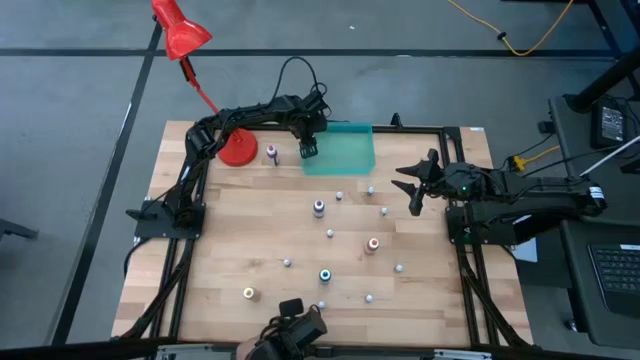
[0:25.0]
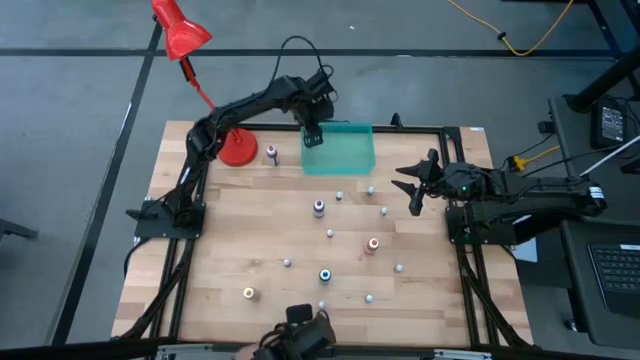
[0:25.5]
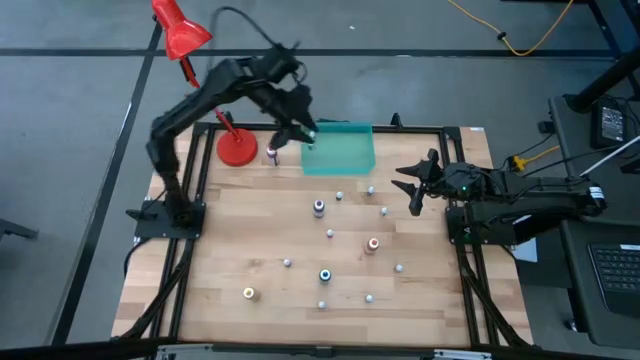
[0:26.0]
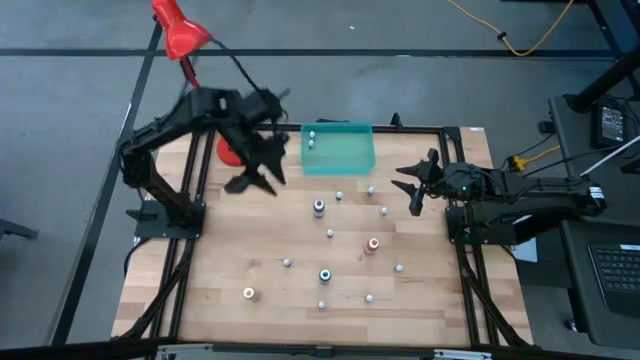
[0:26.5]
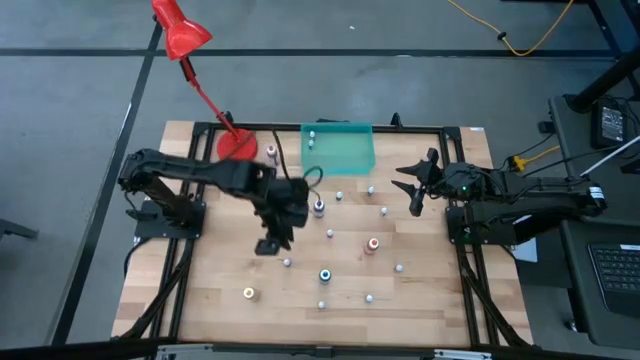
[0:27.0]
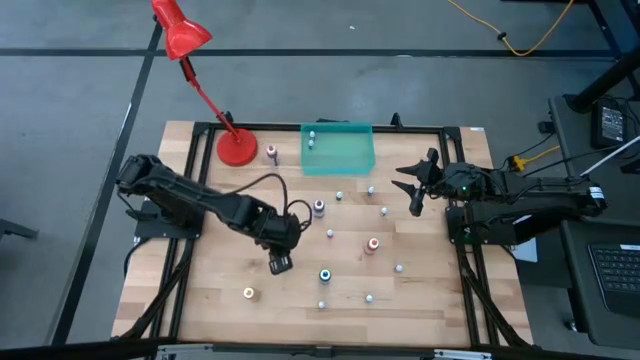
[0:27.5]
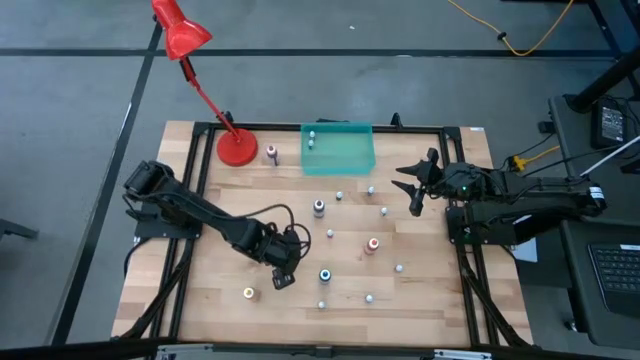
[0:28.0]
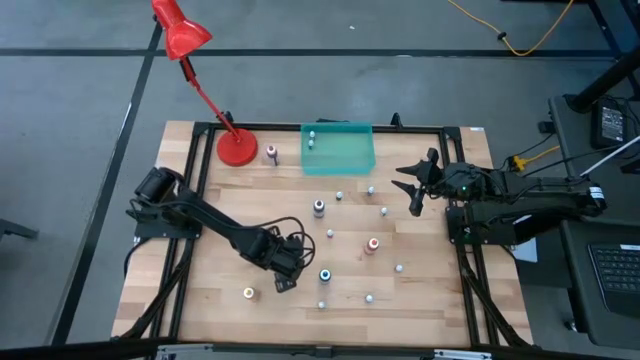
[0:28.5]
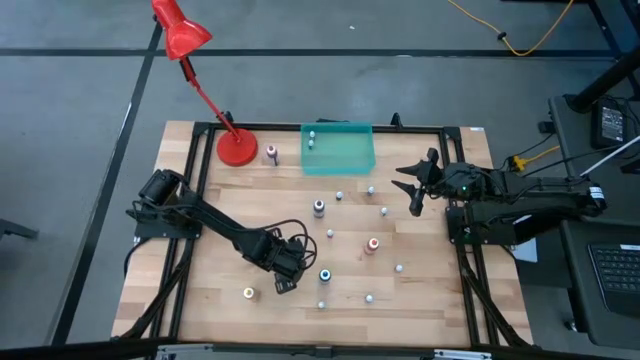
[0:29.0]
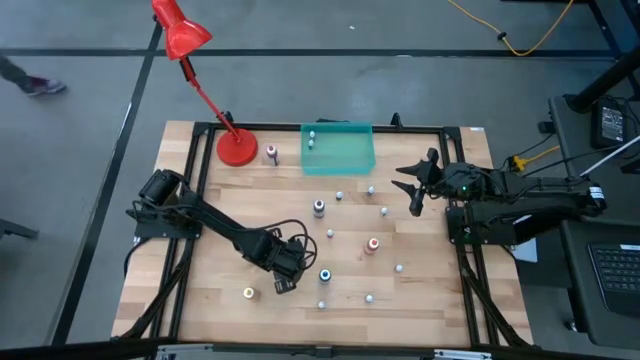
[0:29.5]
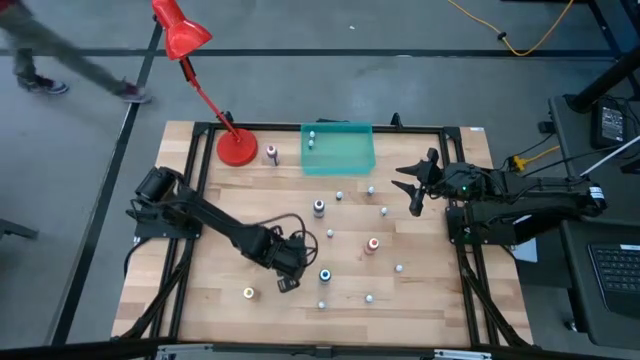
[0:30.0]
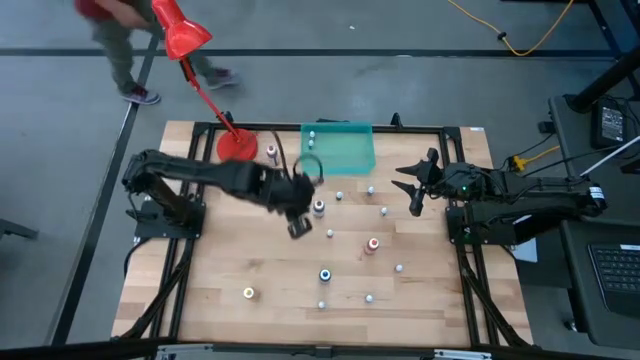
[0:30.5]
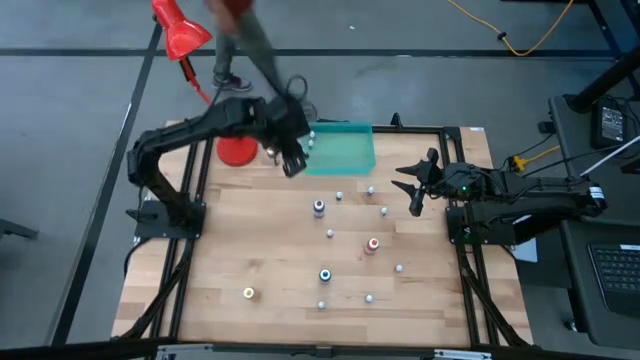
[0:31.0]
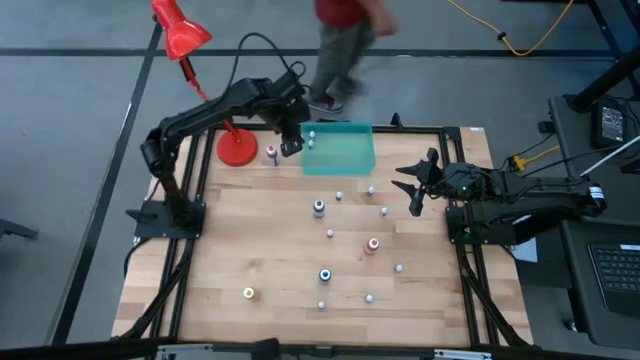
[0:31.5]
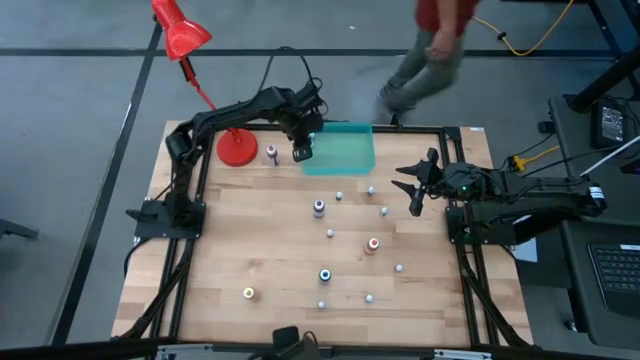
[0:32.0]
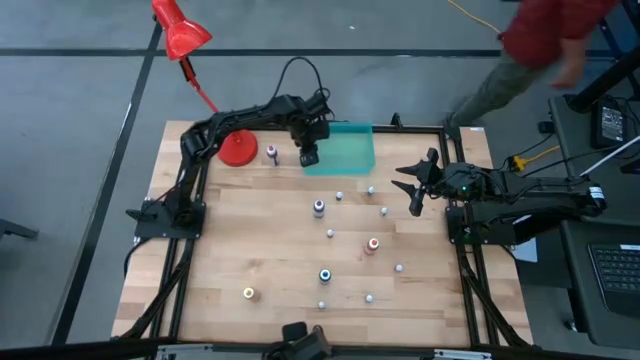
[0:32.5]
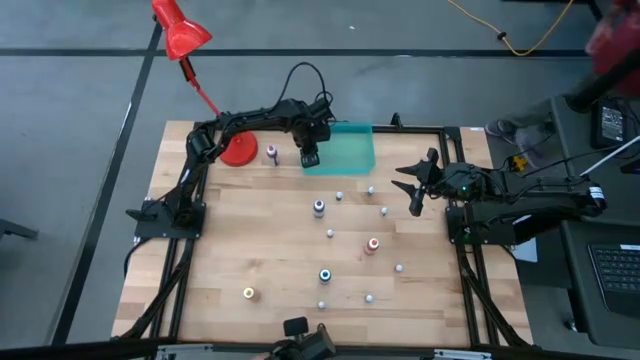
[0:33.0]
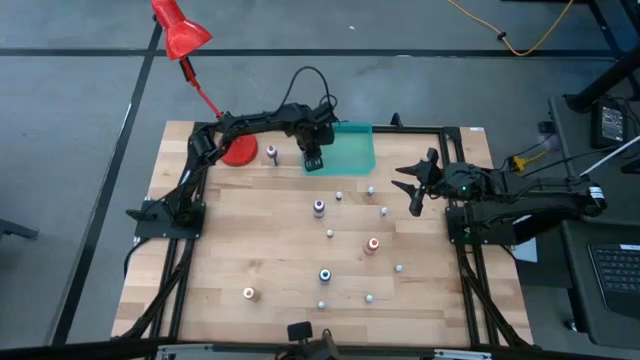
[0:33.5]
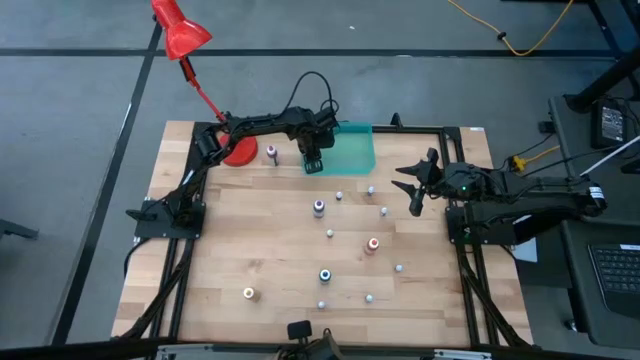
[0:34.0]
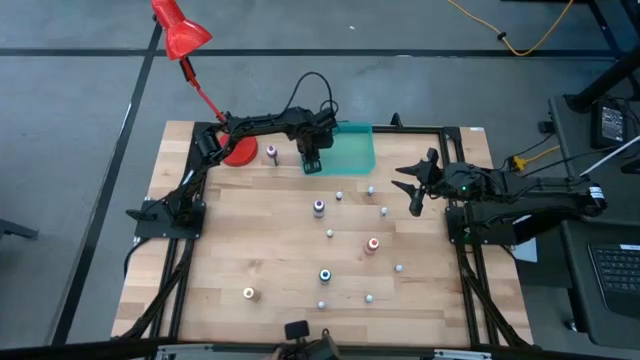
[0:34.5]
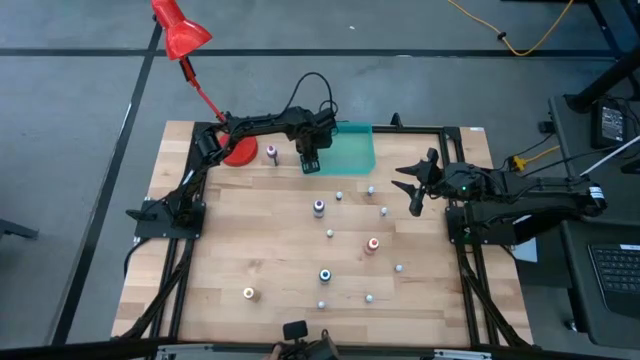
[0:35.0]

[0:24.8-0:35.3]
Task: Pick & Place food coloring
Put the small purple food coloring bottle into the green bin

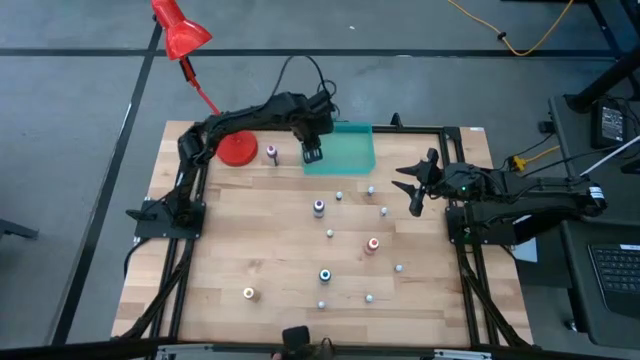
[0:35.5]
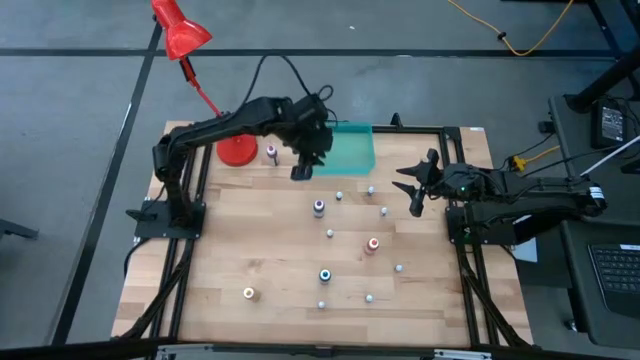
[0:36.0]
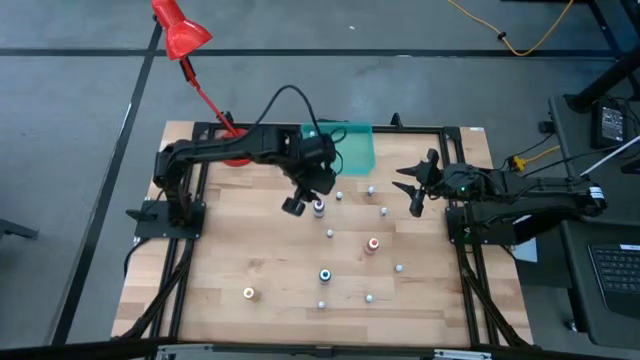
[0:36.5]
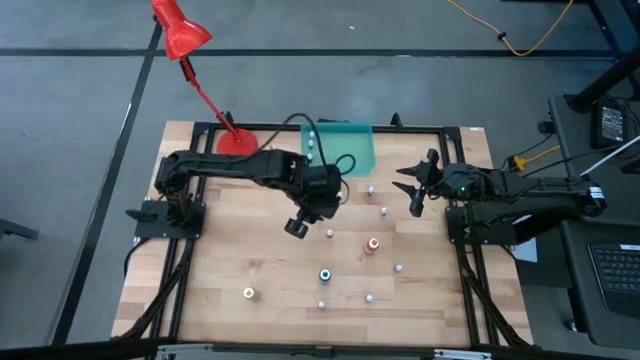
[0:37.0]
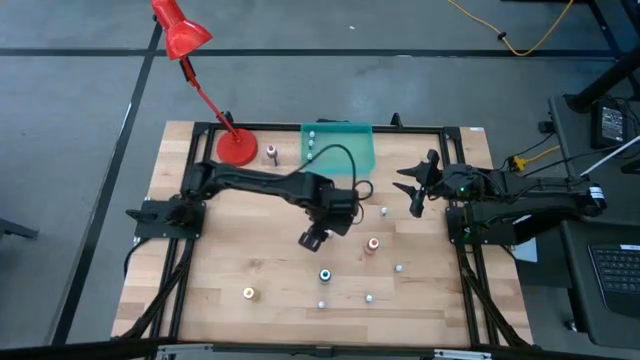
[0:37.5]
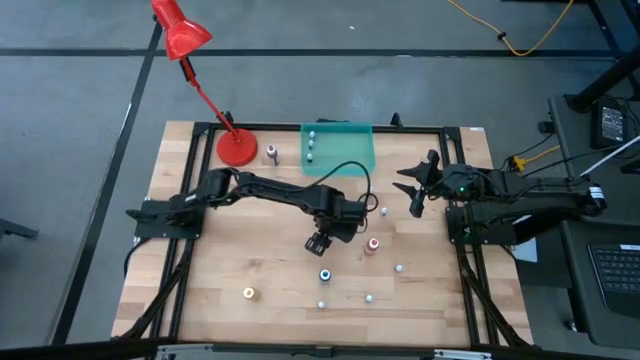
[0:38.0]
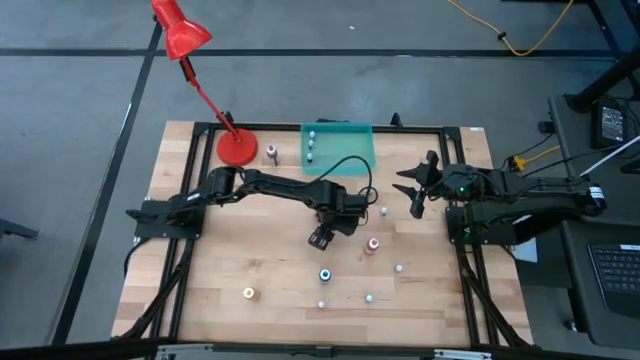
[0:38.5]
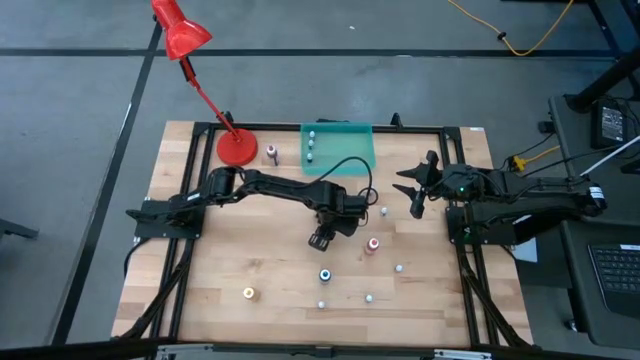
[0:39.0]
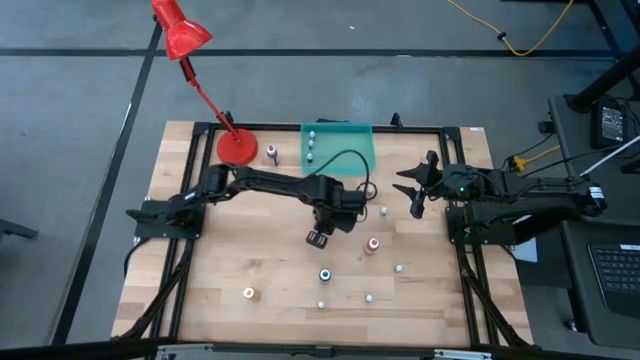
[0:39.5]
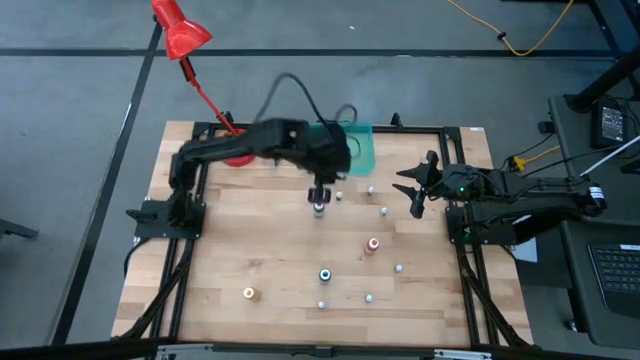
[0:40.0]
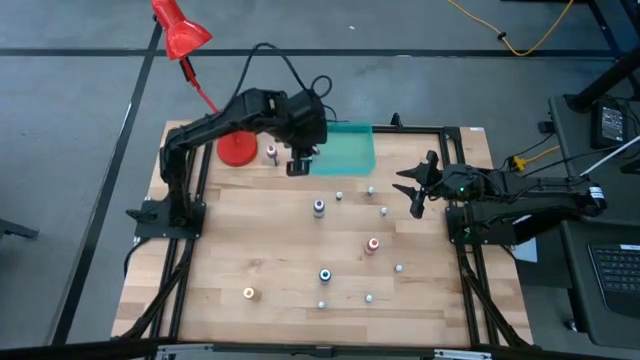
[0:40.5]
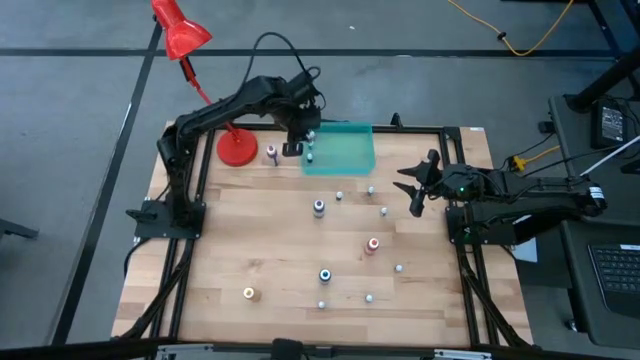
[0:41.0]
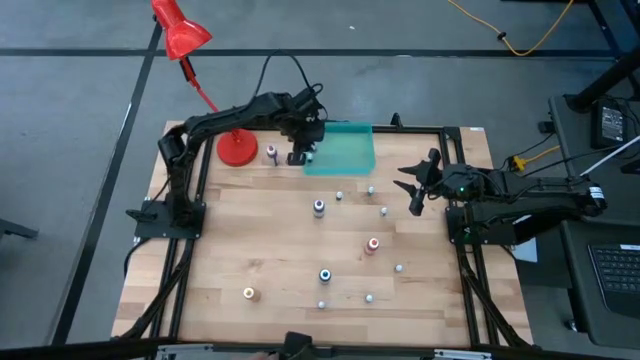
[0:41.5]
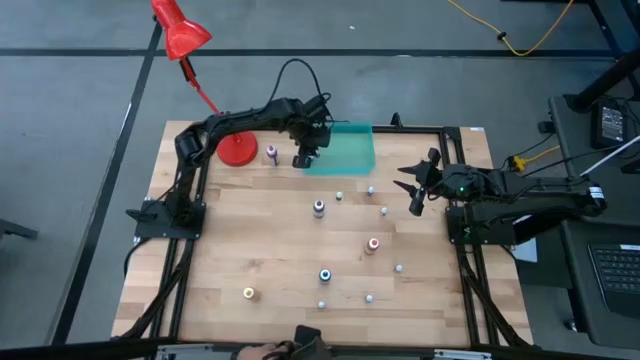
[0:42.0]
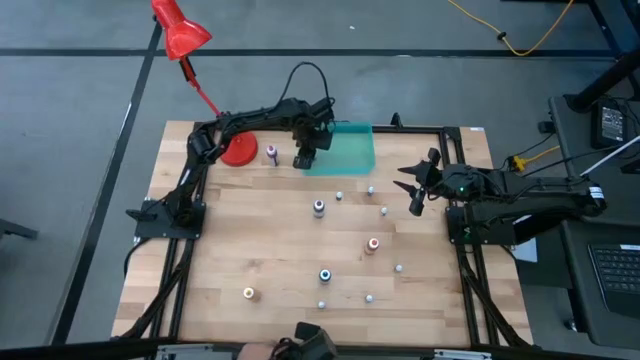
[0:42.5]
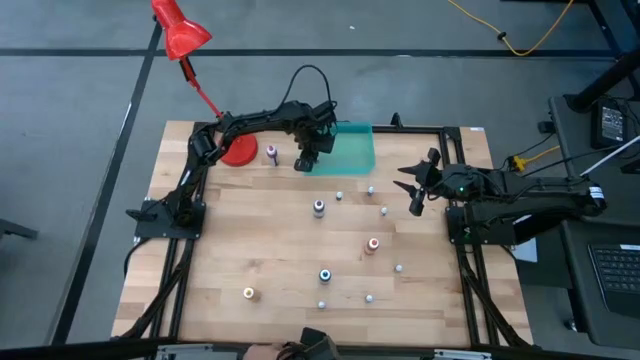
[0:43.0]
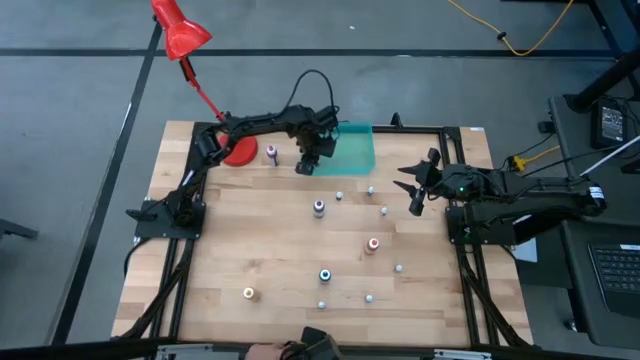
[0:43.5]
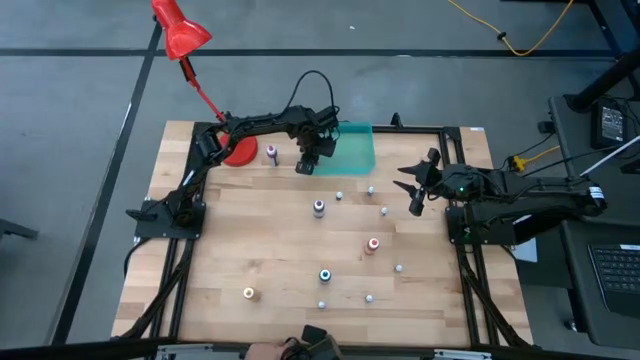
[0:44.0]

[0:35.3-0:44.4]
Put the left small pink food coloring bottle into the green bin

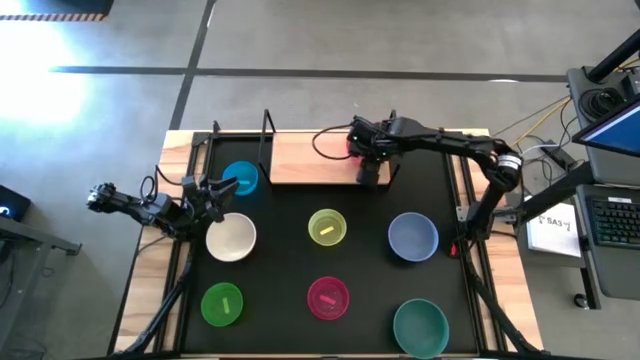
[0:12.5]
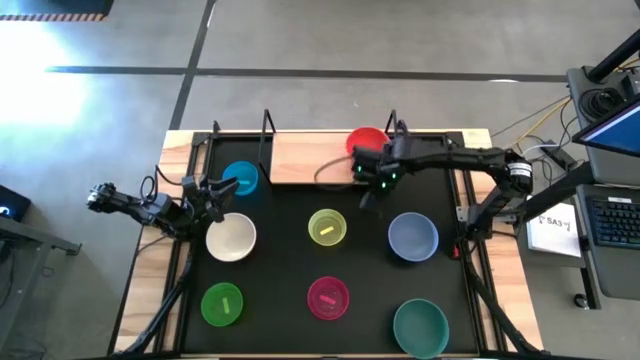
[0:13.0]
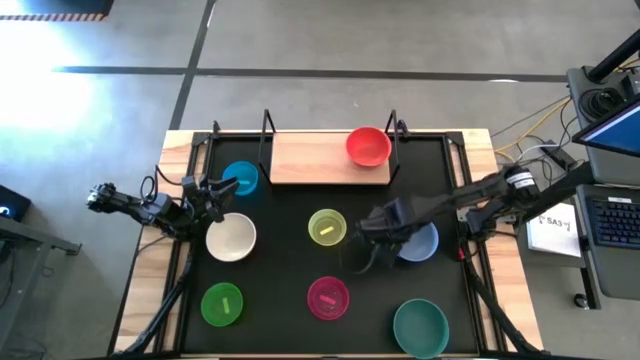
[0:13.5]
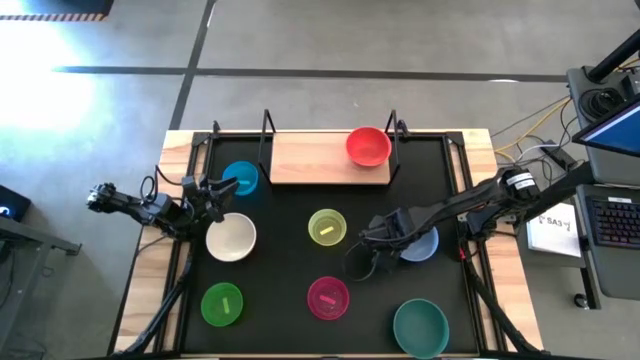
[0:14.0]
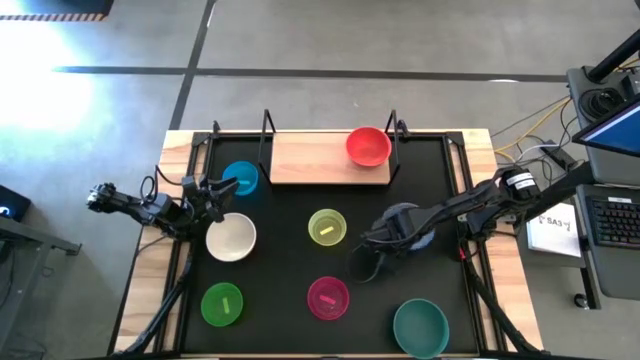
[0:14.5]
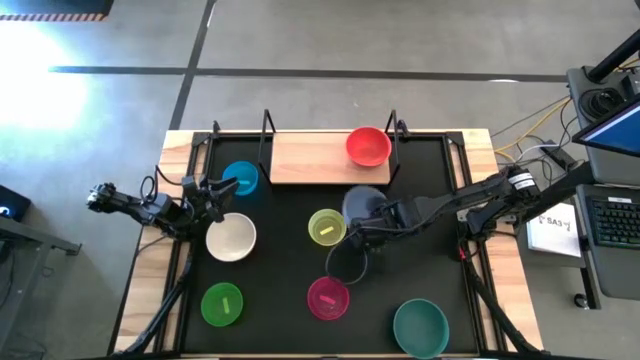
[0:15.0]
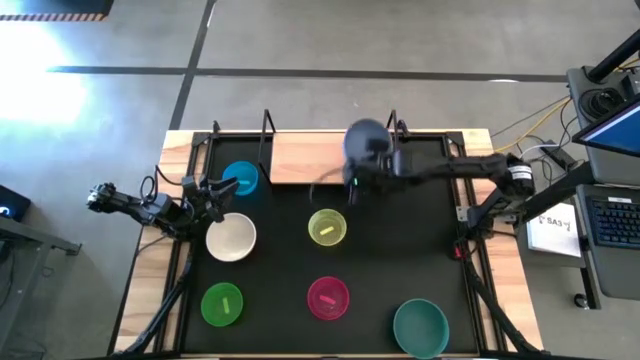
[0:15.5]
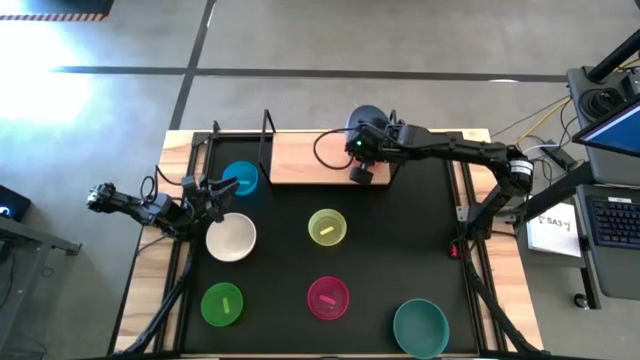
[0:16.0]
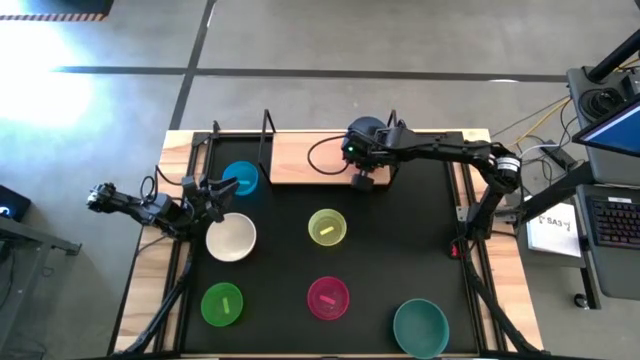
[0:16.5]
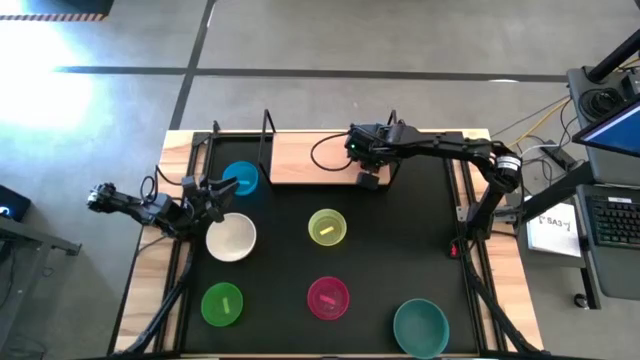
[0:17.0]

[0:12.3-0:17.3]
Task: Place and stack bowls onto a shelf
Stack the light blue bowl on top of the orange bowl
